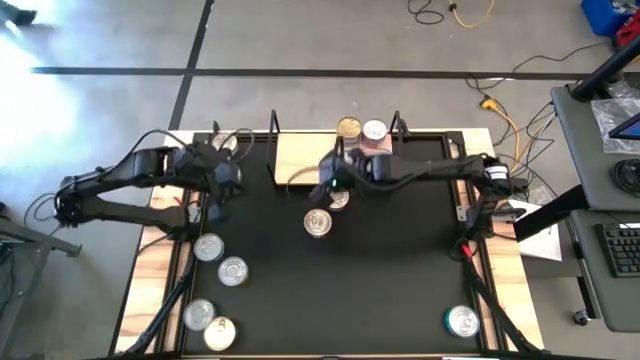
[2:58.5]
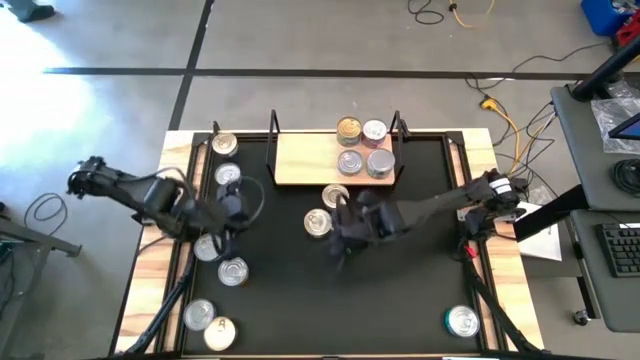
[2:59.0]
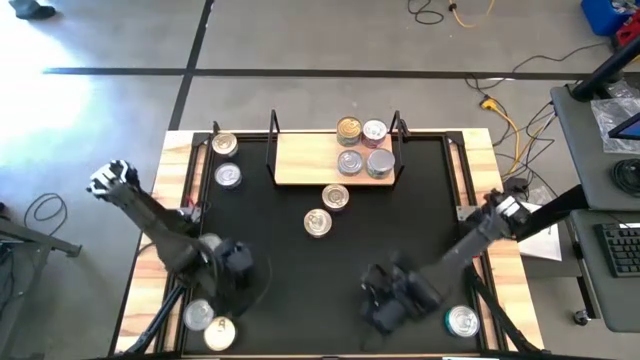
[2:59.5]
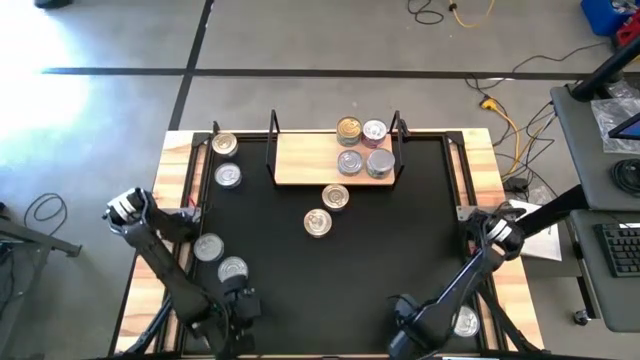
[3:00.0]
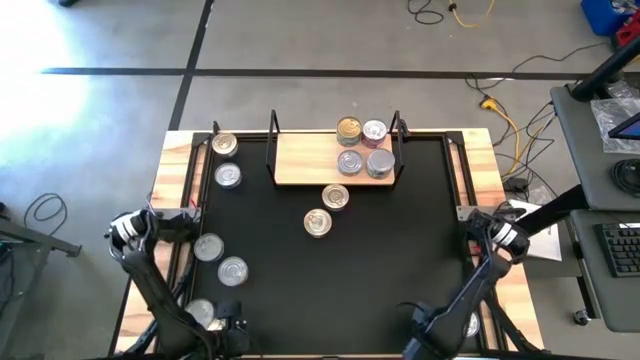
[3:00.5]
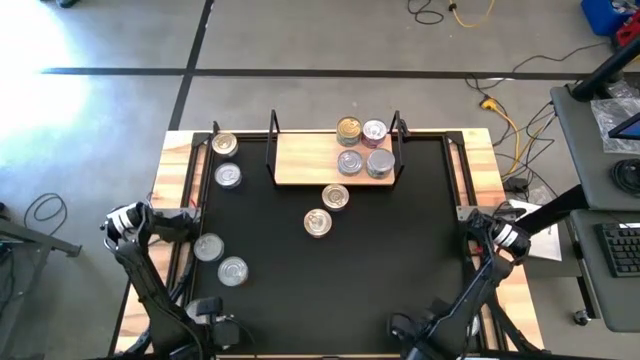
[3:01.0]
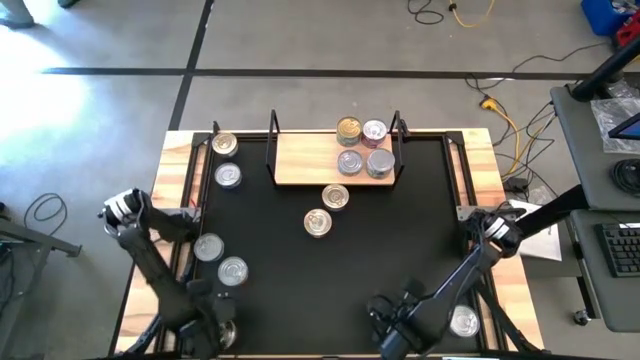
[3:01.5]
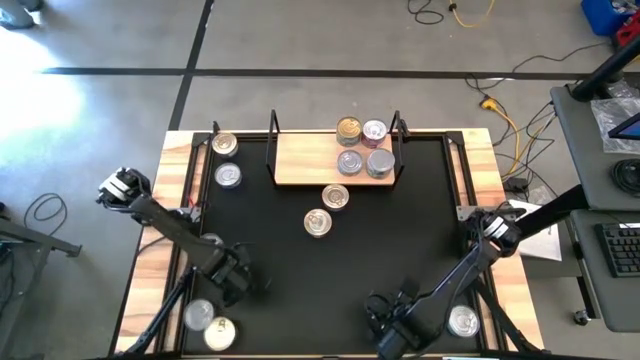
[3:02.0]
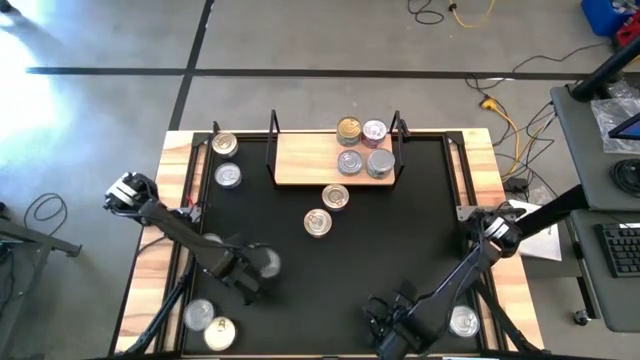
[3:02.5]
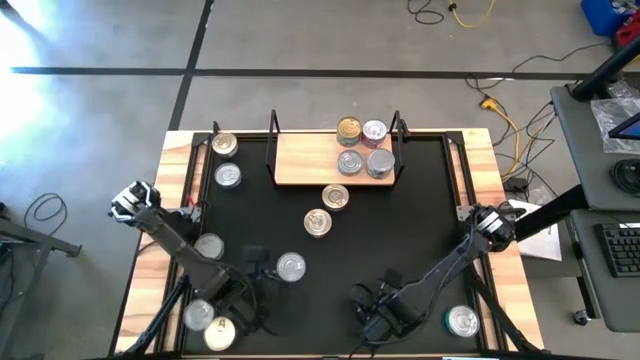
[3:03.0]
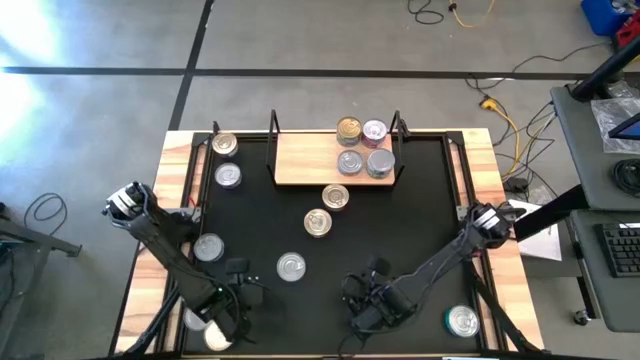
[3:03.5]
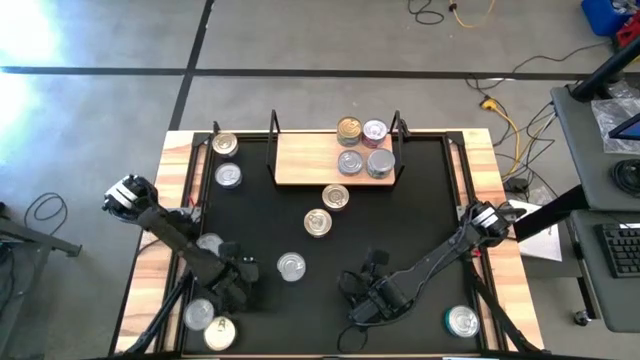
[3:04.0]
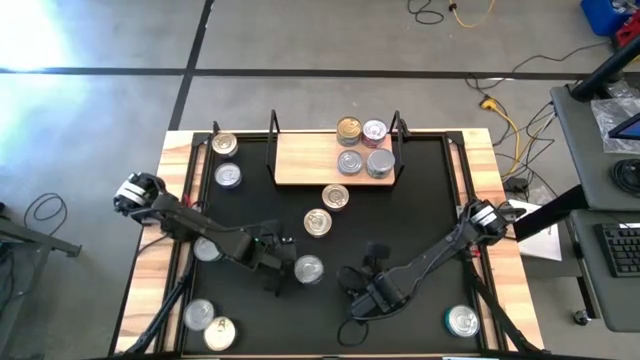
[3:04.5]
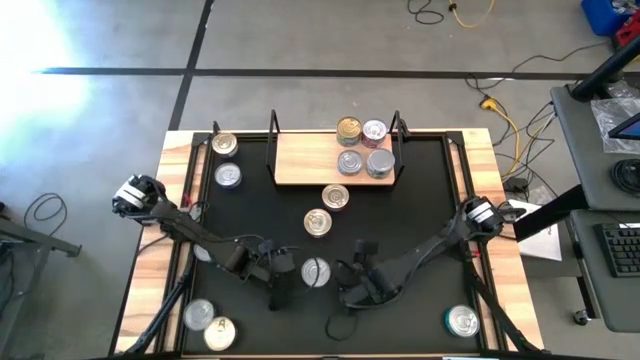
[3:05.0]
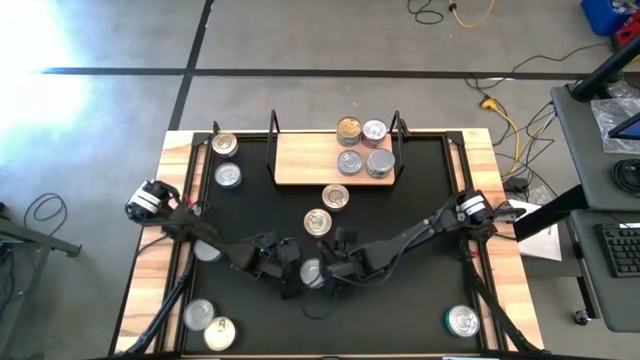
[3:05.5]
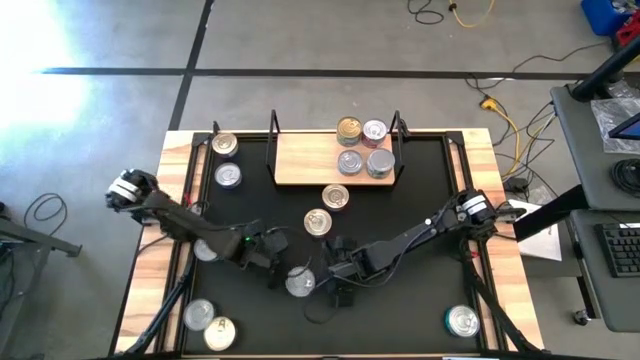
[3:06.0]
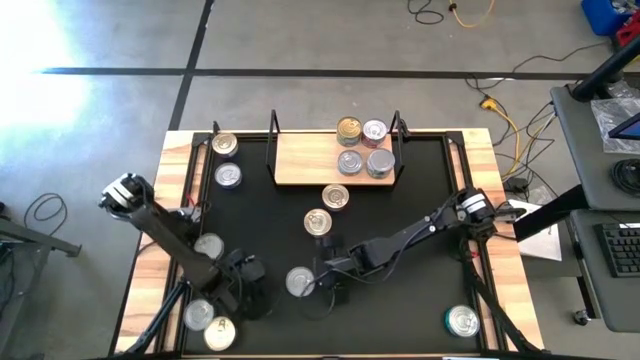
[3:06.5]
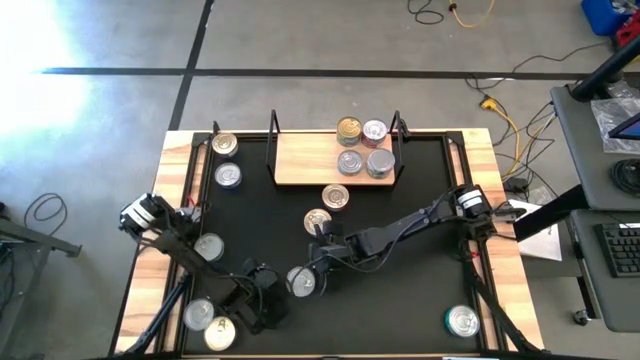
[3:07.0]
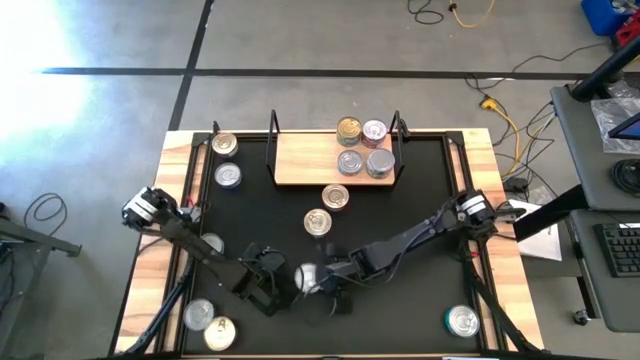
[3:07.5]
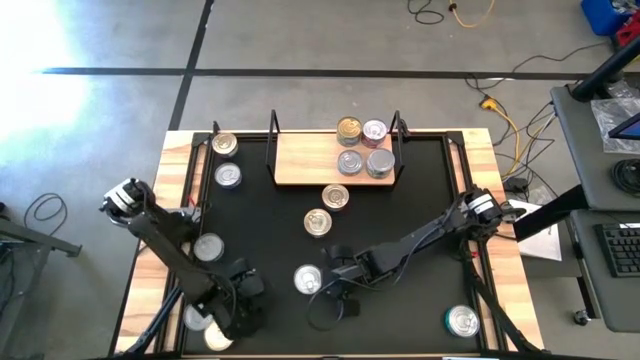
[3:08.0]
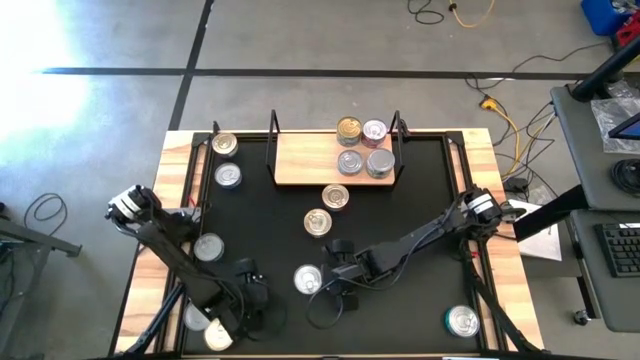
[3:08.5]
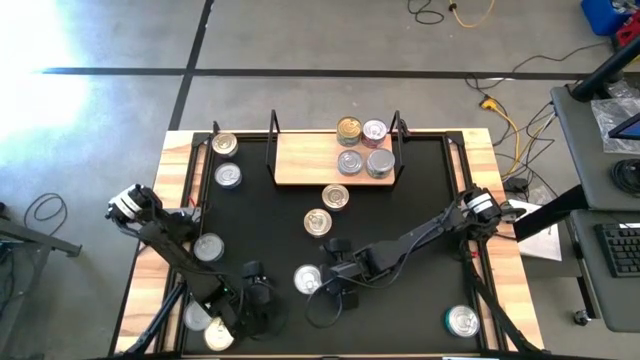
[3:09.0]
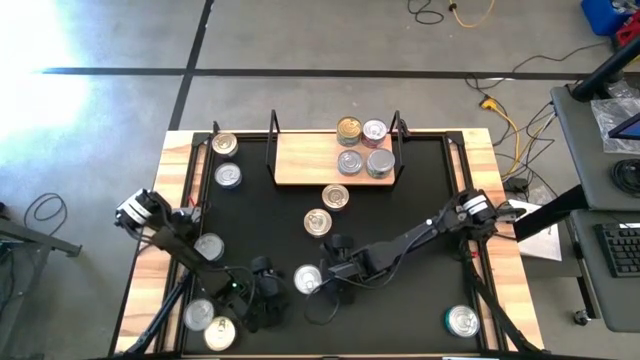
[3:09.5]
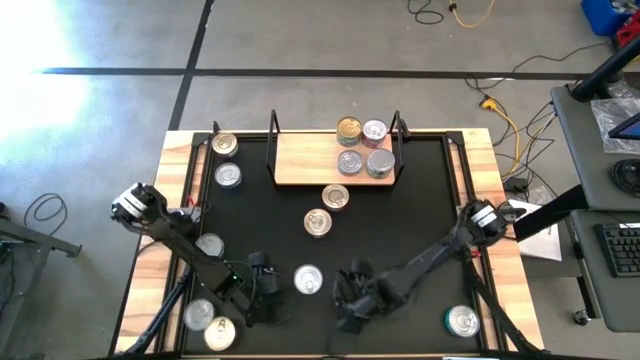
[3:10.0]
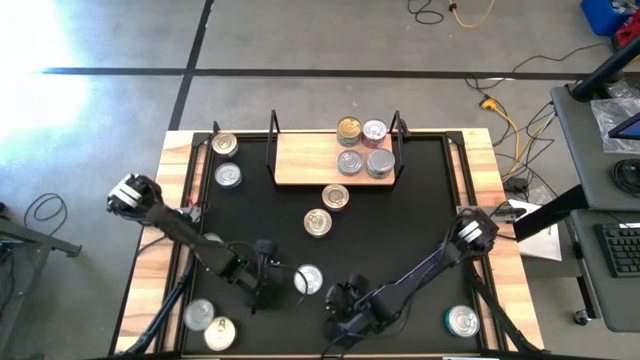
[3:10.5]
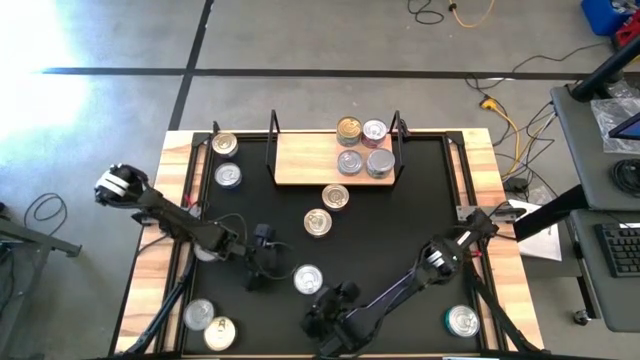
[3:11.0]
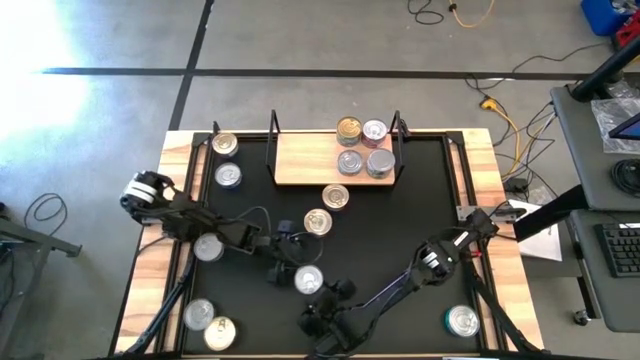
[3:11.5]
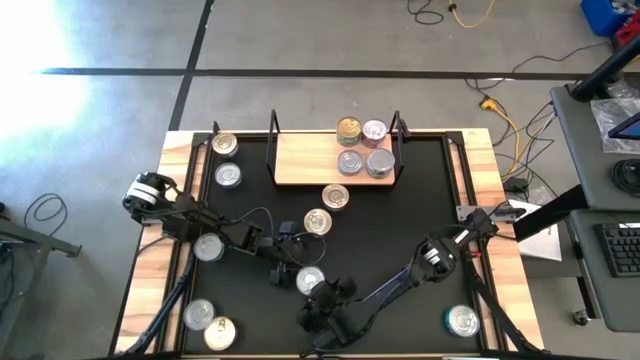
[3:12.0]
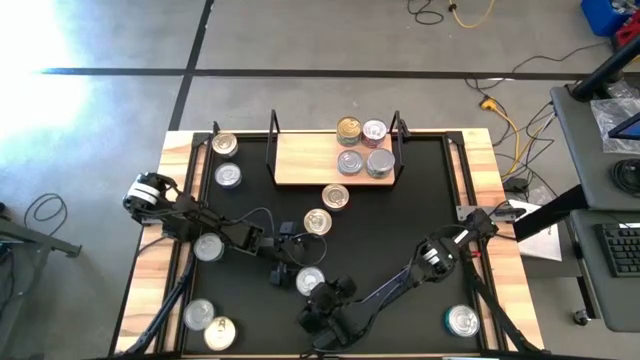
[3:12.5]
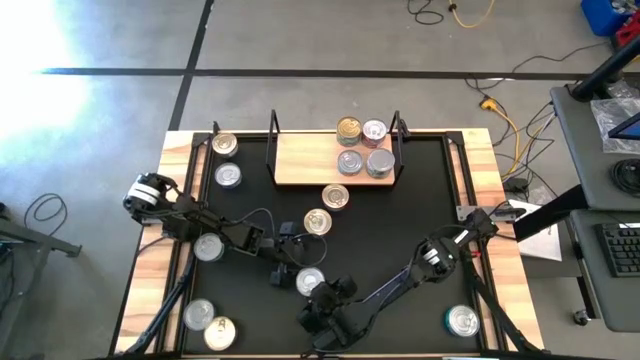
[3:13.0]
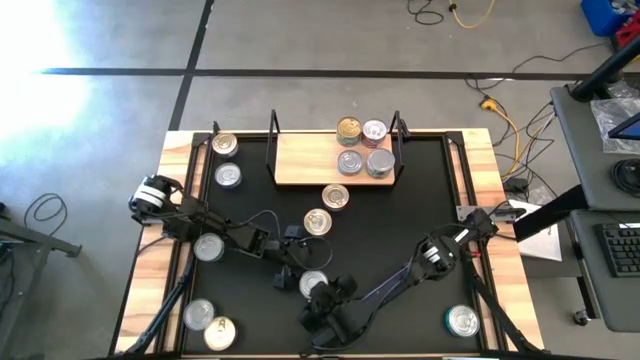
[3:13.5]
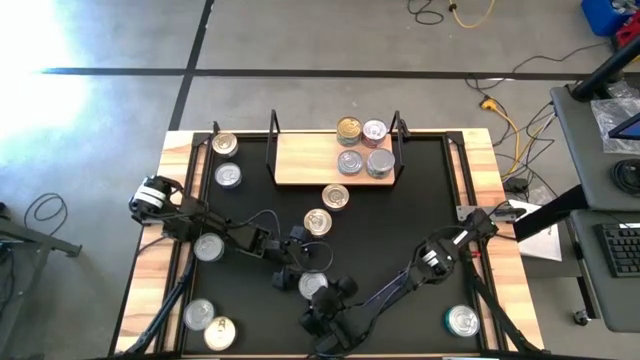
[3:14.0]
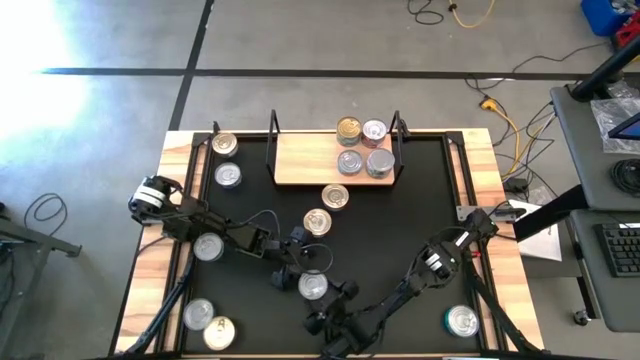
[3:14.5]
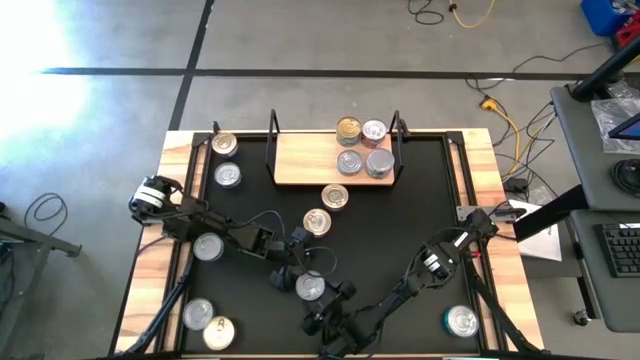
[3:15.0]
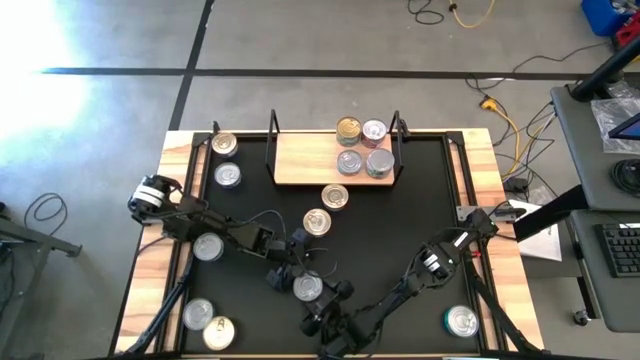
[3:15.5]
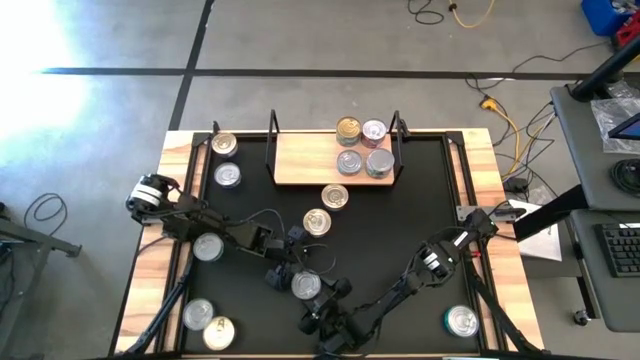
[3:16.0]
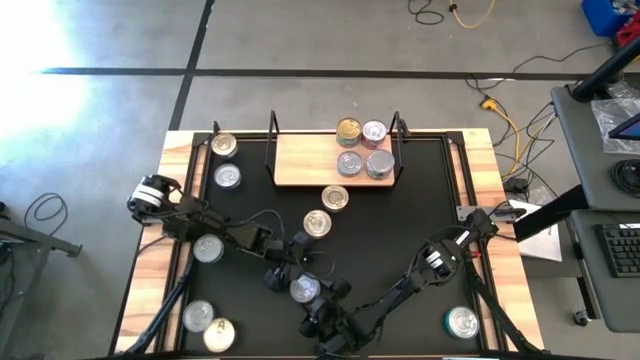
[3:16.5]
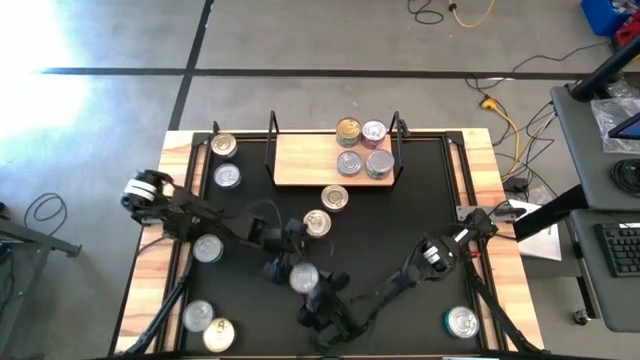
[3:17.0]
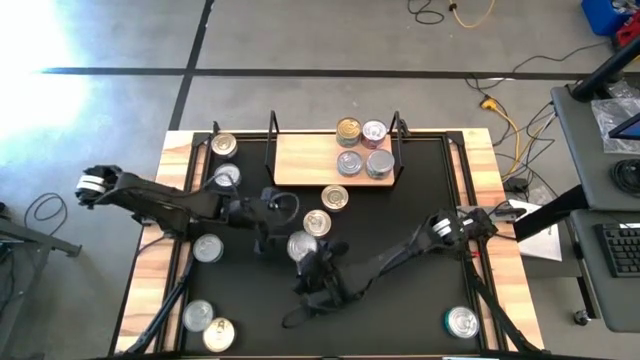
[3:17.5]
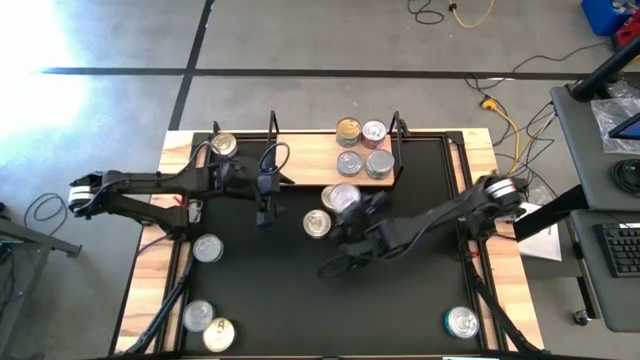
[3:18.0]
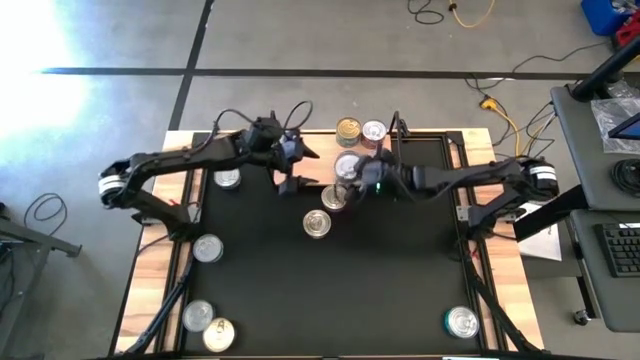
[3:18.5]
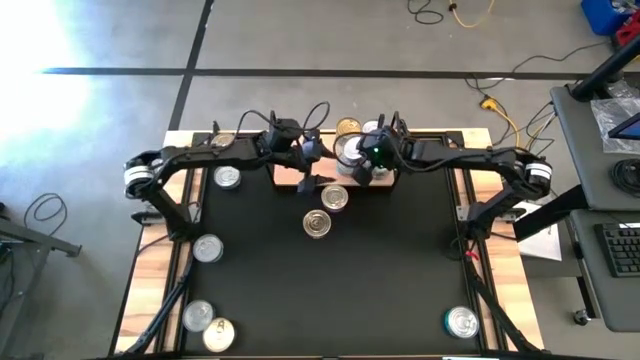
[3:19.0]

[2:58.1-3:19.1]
Task: Stack canned seafood by type on shelf
Stack the yellow-blue tuna can on top of the other yellow-blue tuna can on the shelf
